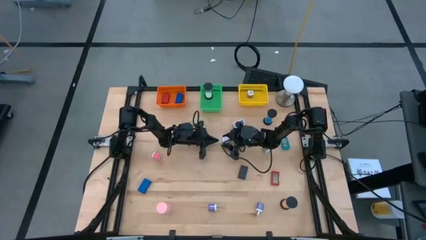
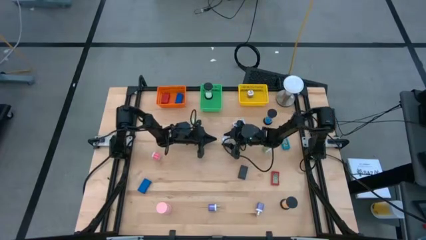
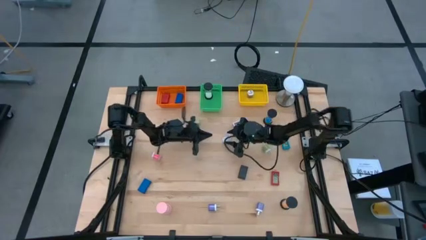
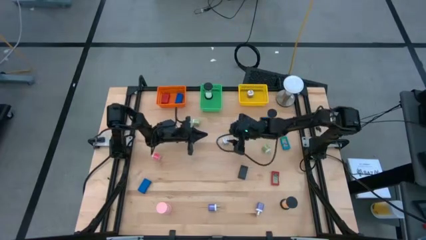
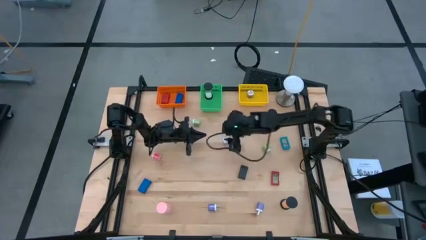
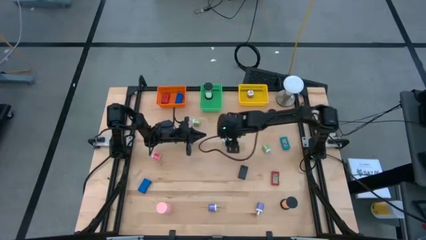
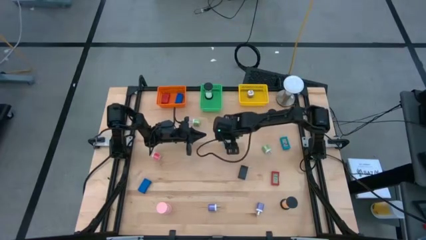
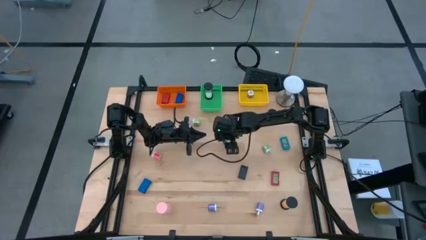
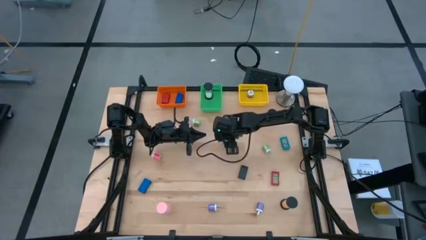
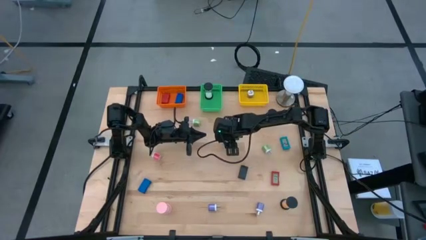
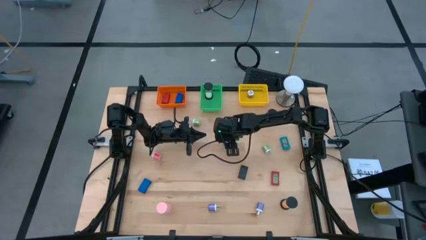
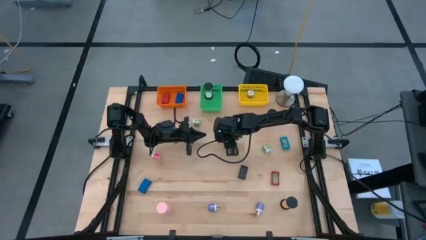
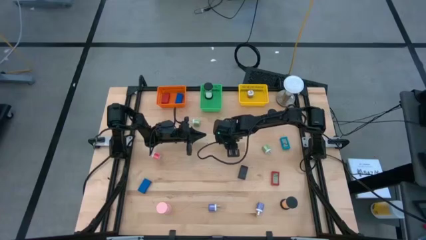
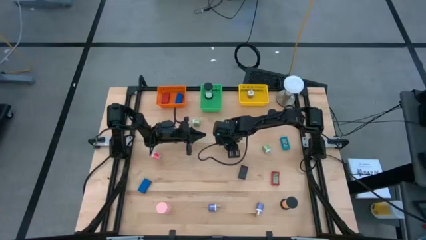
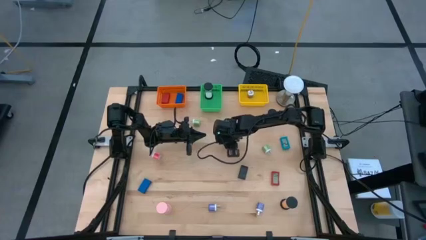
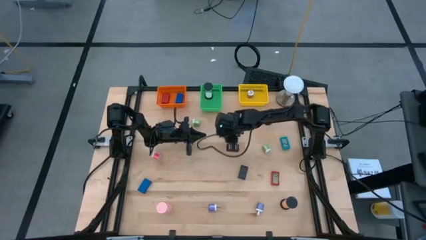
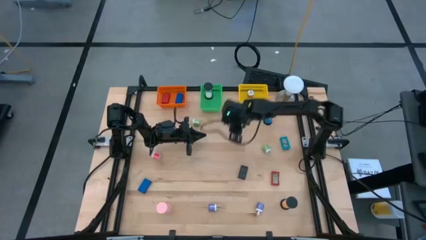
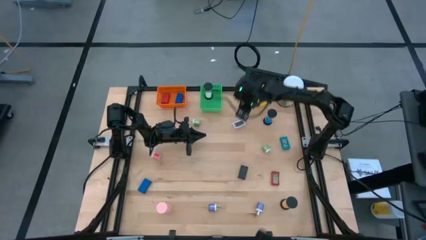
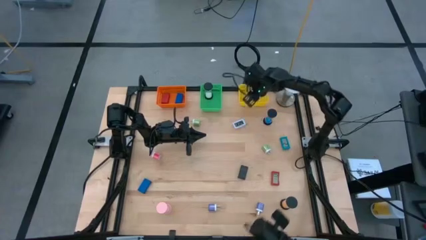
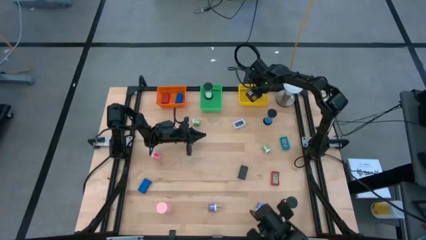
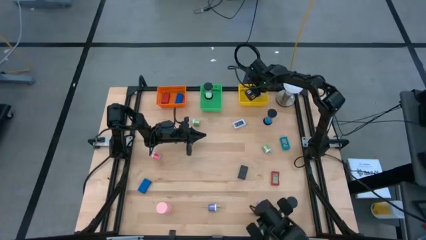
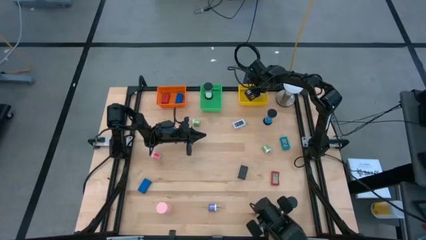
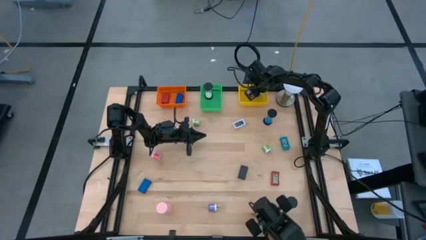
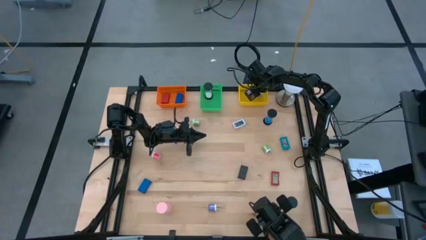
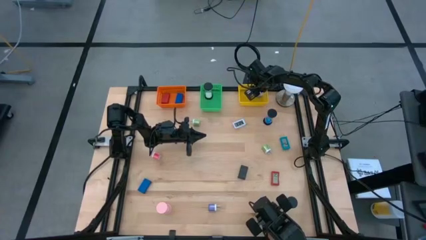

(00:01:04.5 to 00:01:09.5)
Task: Pick & Place Office items
Put the blue charger adapter into the yellow bin

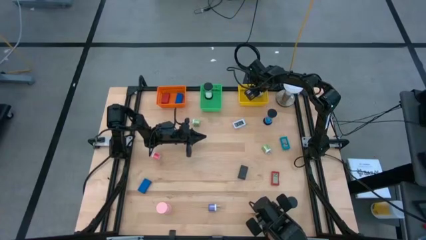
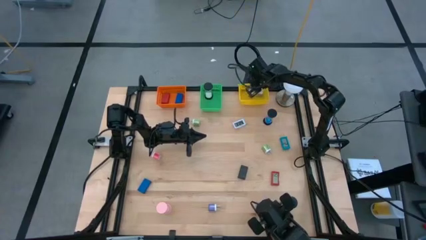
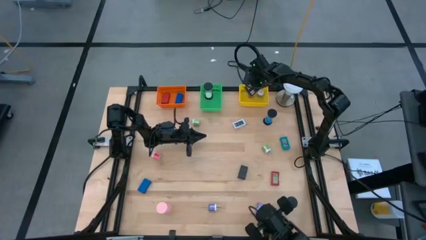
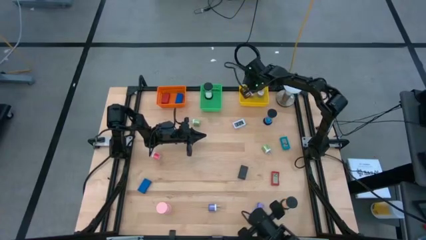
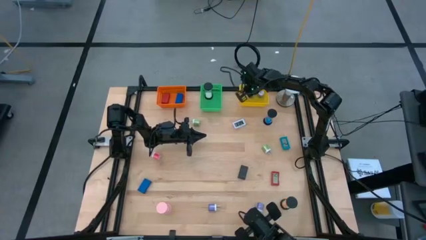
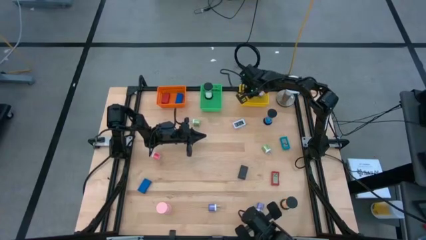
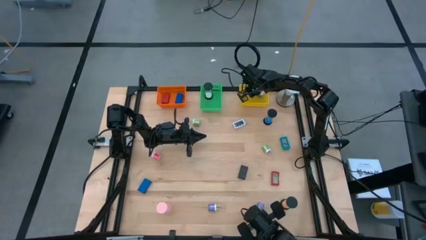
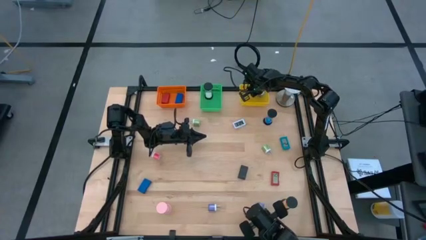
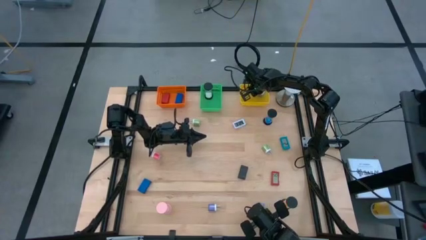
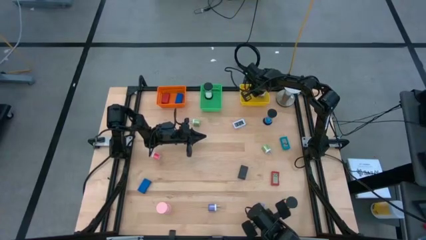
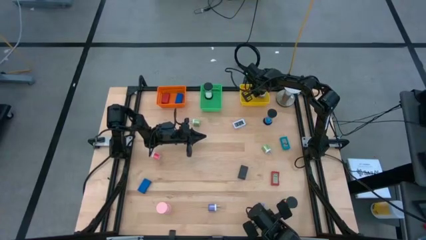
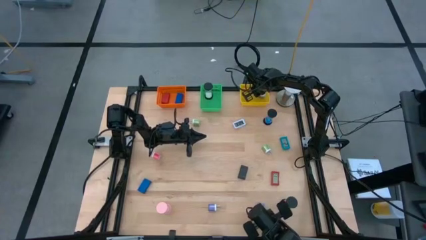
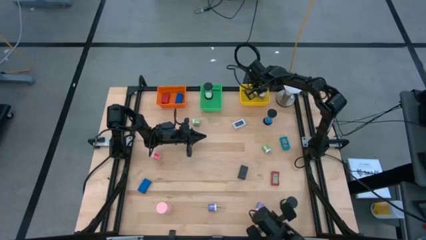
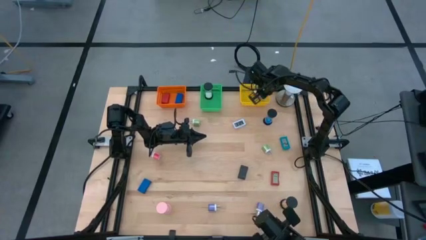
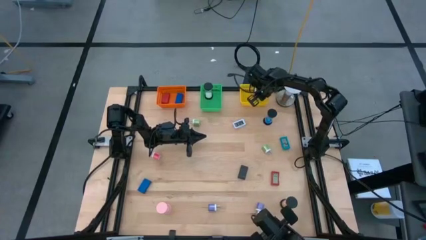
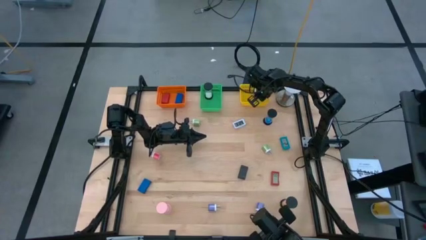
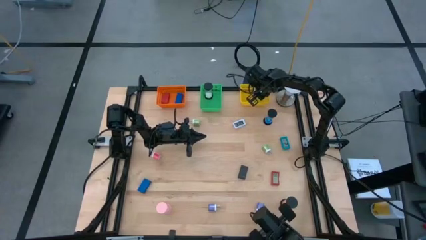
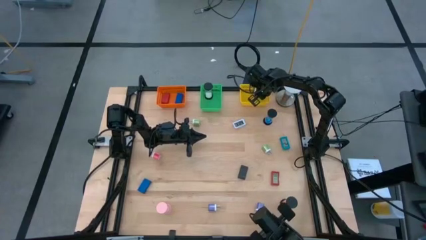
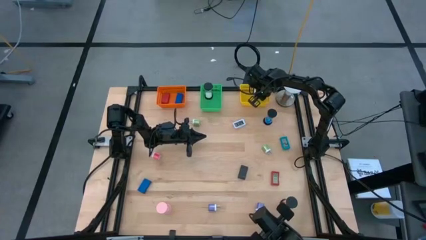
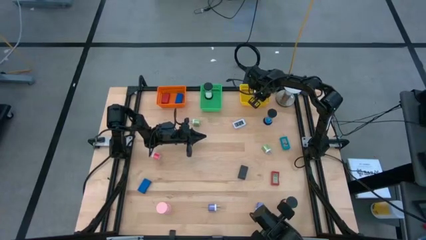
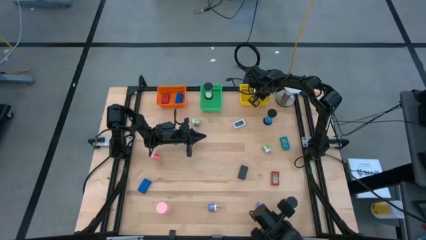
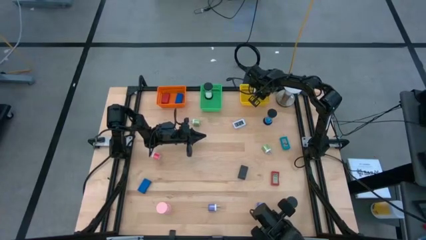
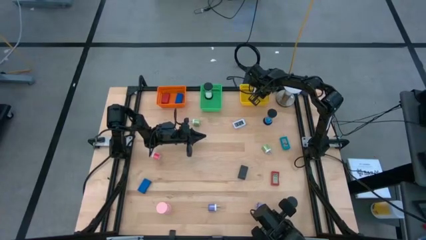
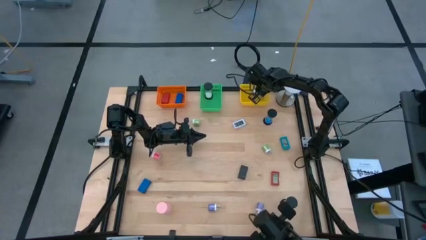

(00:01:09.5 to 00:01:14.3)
Adjust the charger adapters in the yellow bin

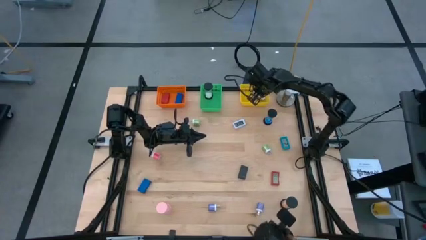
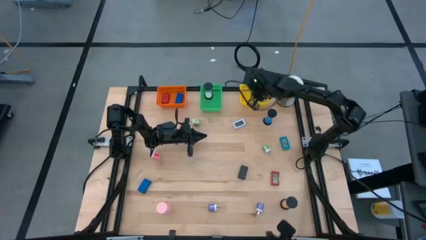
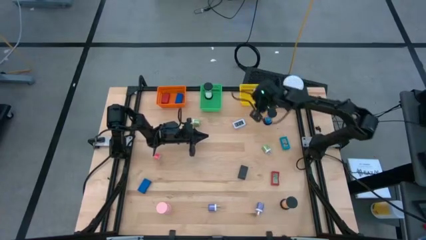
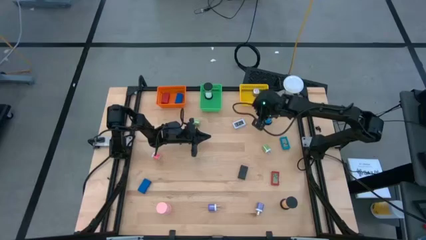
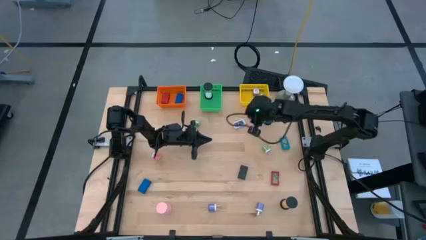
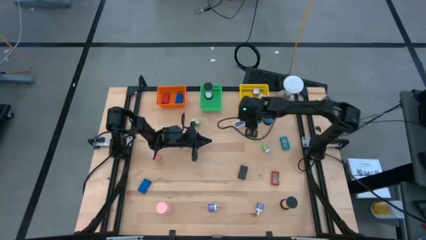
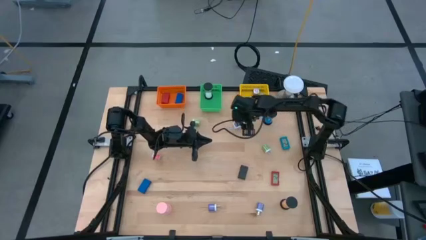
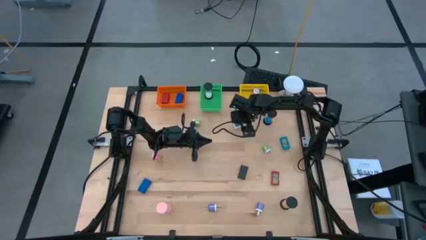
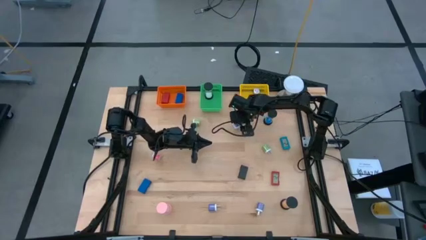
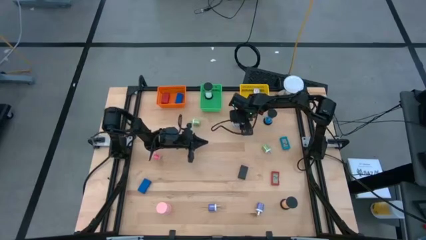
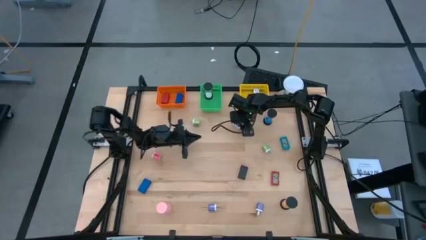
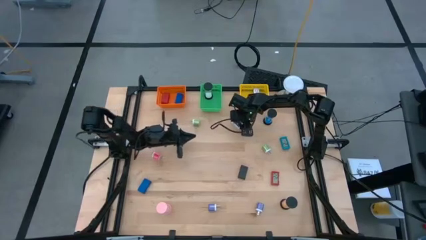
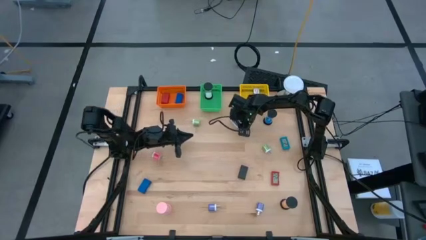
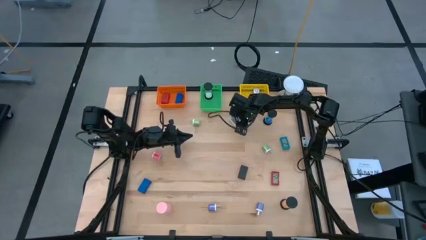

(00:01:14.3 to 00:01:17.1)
Put the white digital clock into the orange bin
